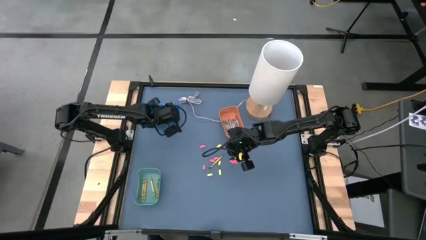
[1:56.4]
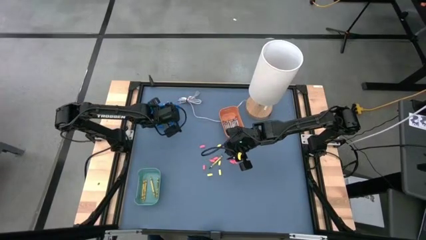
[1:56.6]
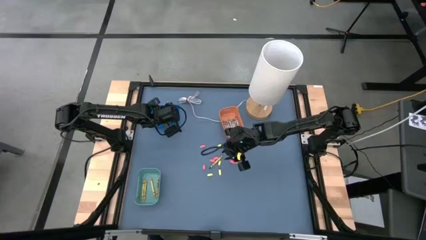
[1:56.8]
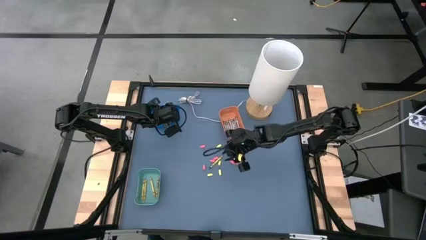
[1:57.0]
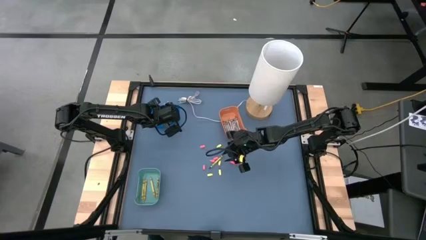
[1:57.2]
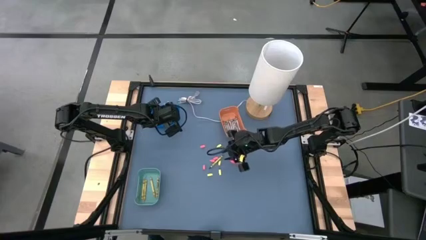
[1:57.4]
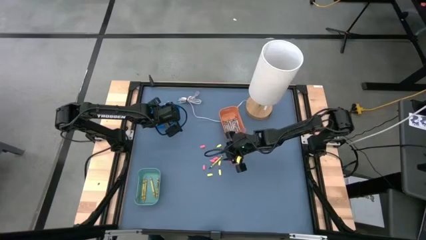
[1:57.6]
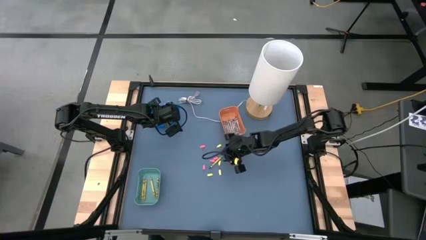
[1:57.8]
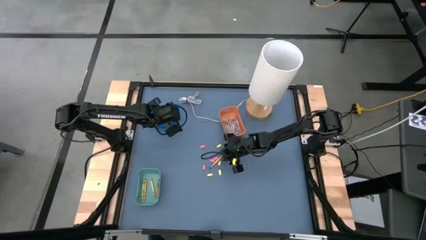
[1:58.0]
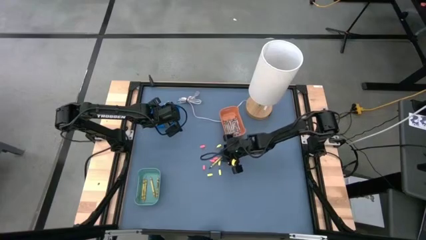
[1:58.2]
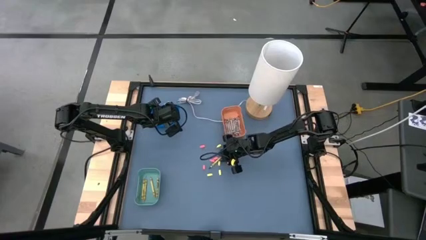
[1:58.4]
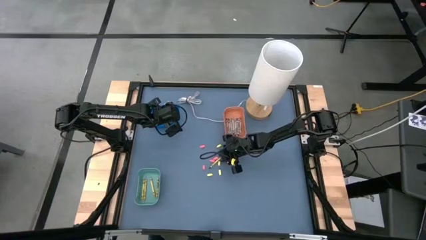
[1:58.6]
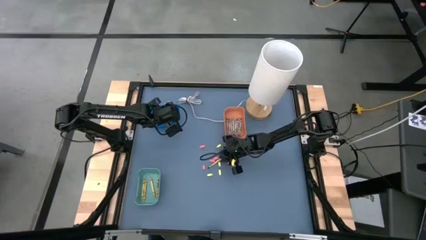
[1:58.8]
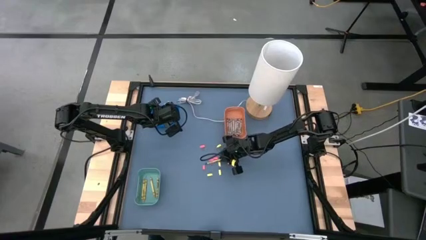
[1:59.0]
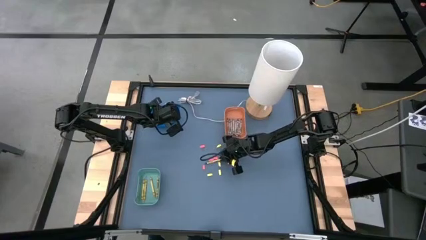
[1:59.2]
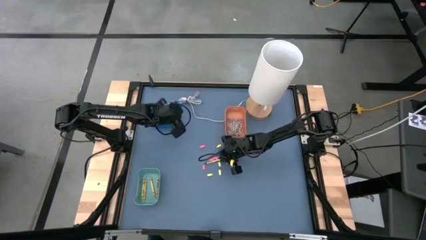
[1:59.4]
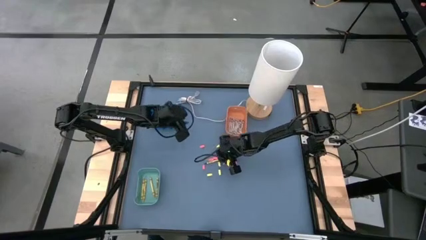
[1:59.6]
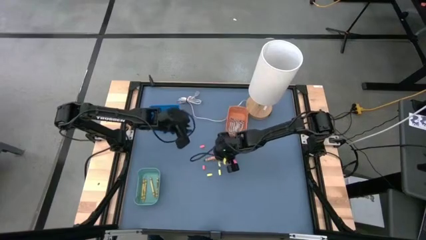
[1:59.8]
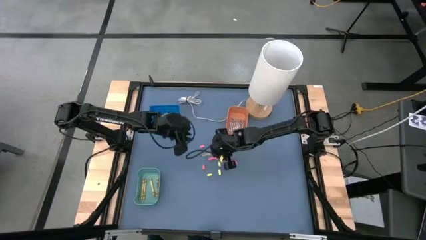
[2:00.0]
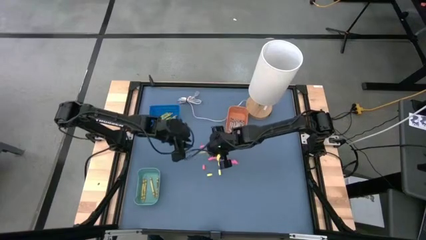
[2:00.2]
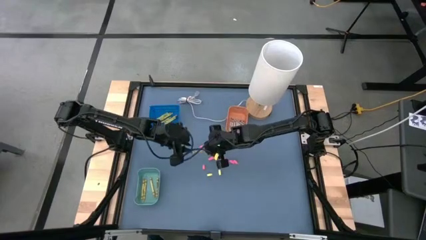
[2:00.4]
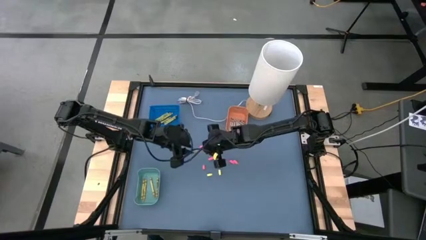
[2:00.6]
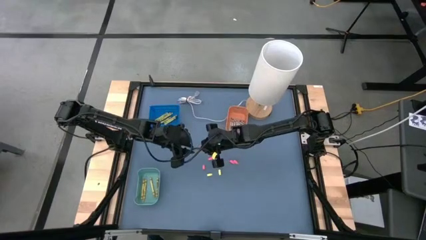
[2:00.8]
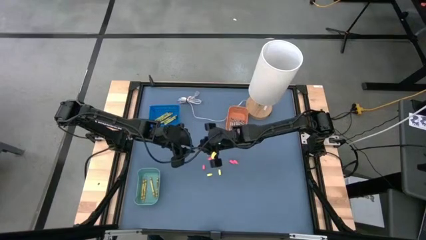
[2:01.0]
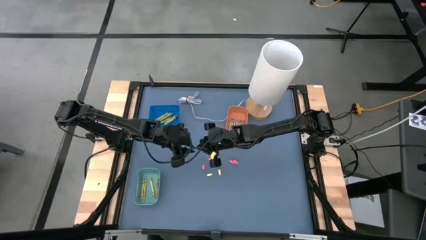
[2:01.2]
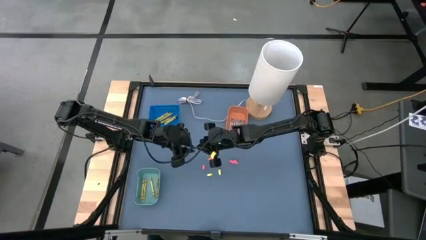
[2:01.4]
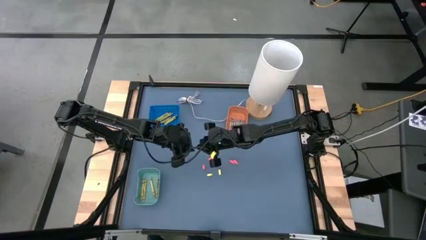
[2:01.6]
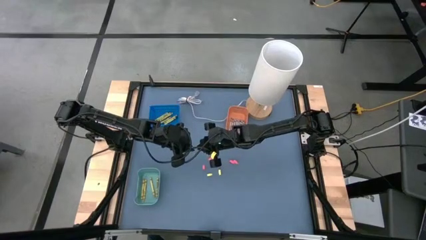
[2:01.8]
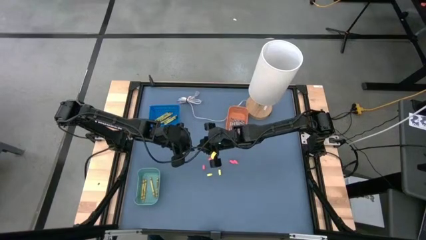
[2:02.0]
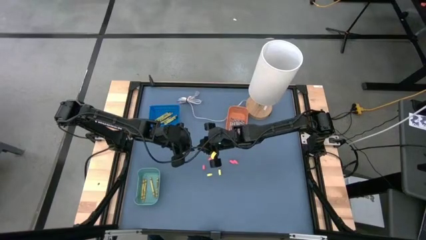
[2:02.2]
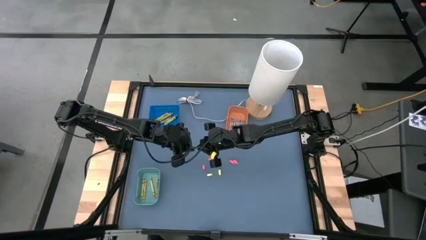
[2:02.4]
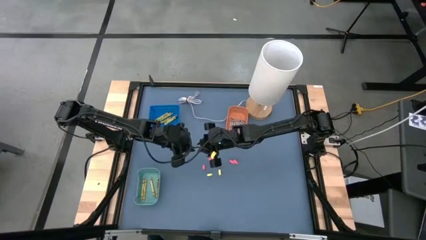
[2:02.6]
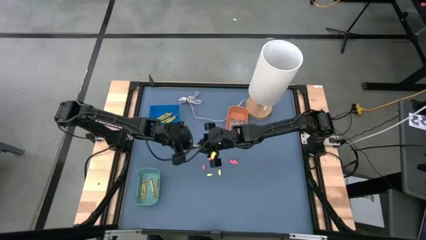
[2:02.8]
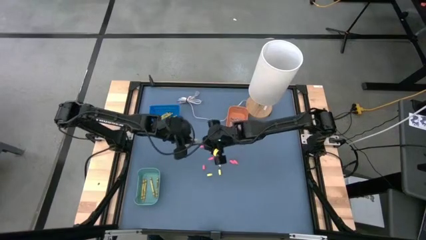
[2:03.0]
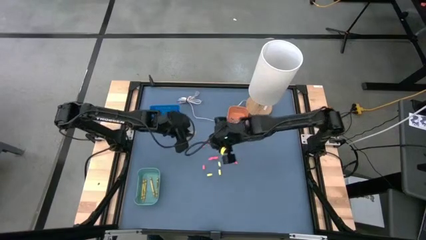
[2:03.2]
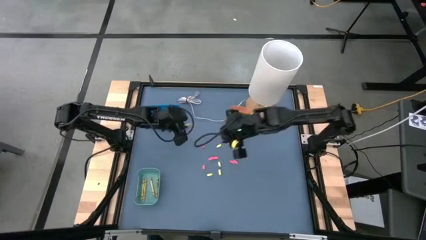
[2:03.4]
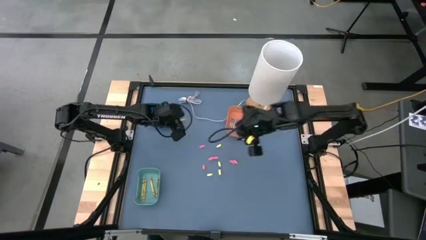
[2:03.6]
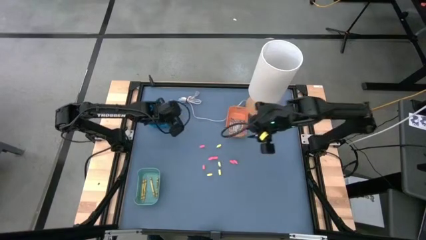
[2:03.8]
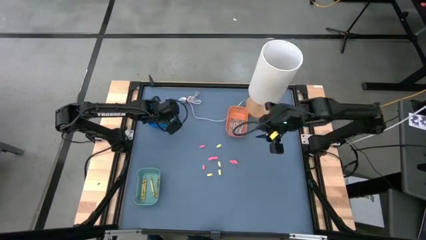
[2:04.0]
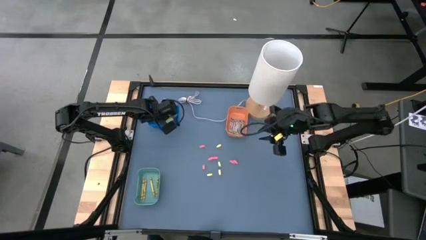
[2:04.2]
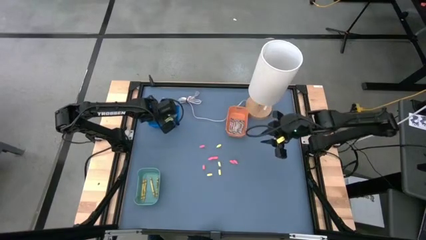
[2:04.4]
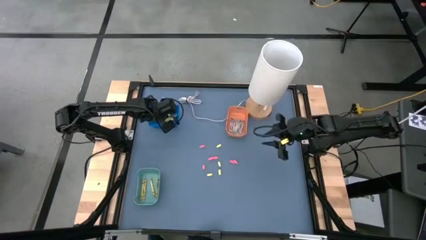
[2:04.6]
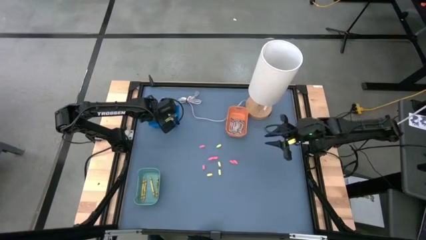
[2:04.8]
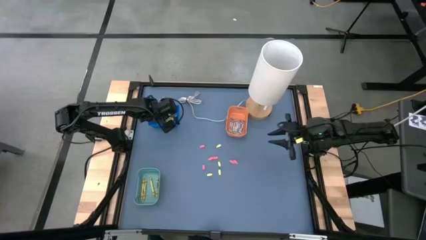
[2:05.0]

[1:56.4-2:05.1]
Task: Sort crayons
Put the green crayon into the blue bin

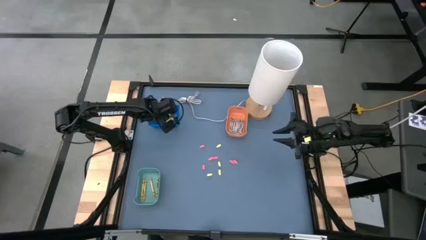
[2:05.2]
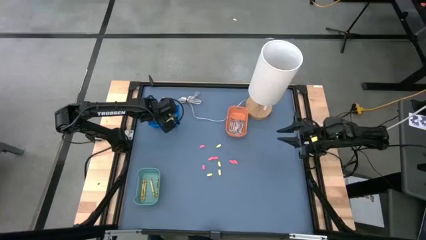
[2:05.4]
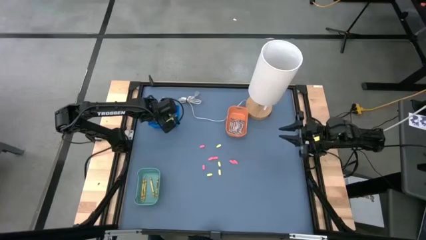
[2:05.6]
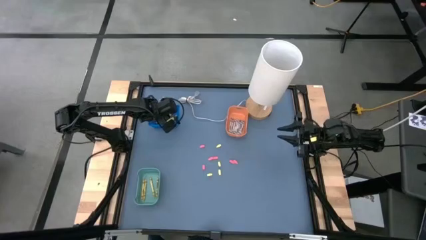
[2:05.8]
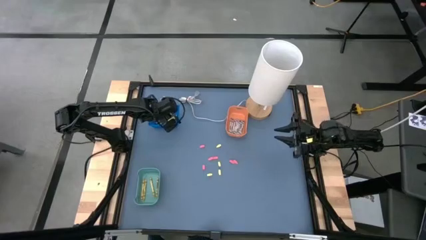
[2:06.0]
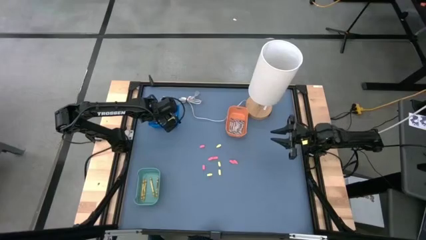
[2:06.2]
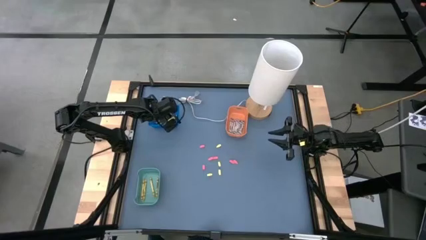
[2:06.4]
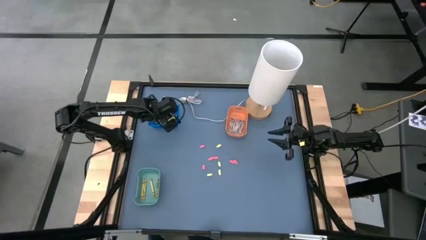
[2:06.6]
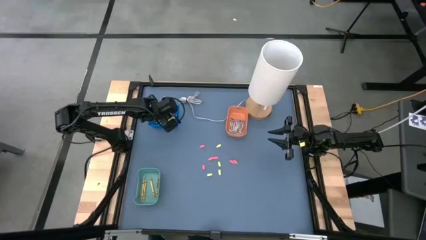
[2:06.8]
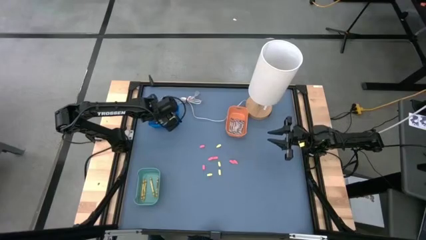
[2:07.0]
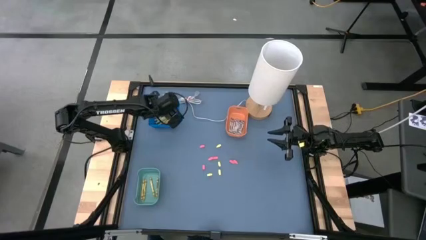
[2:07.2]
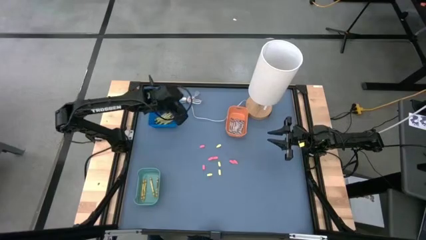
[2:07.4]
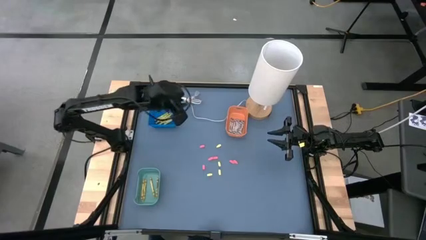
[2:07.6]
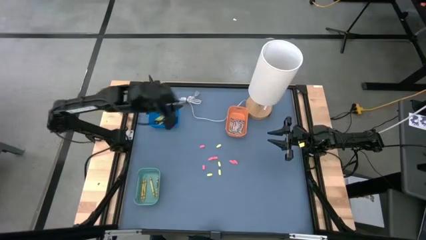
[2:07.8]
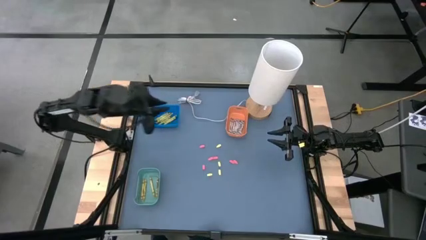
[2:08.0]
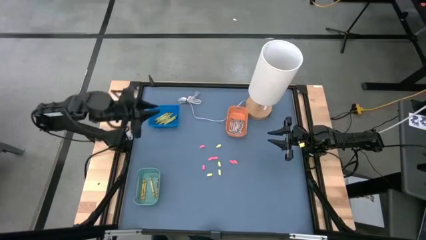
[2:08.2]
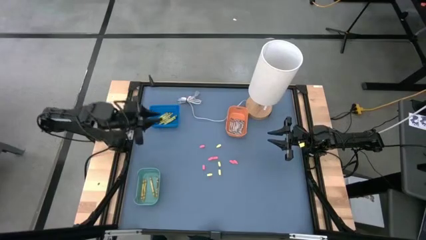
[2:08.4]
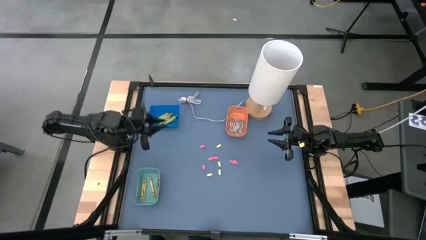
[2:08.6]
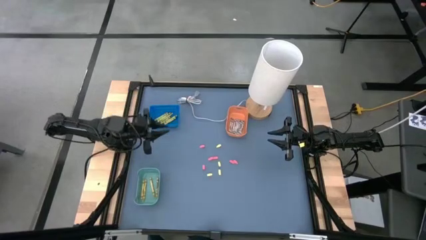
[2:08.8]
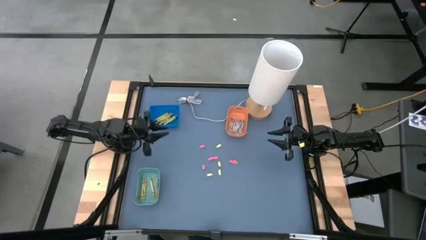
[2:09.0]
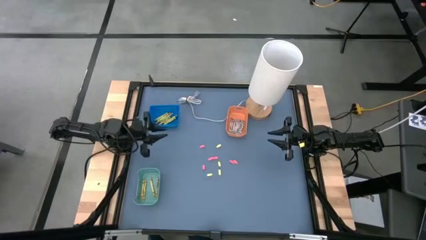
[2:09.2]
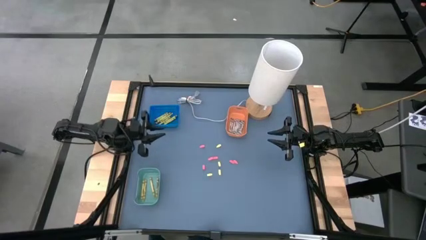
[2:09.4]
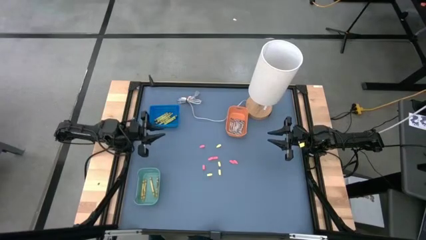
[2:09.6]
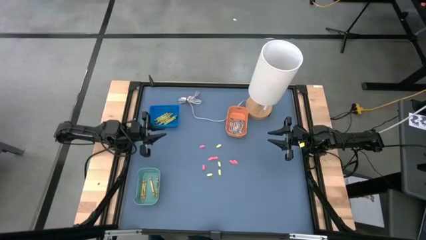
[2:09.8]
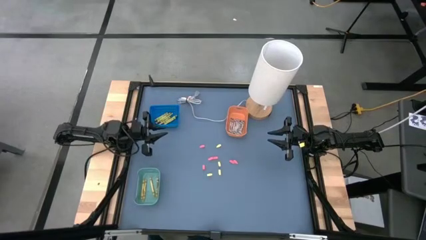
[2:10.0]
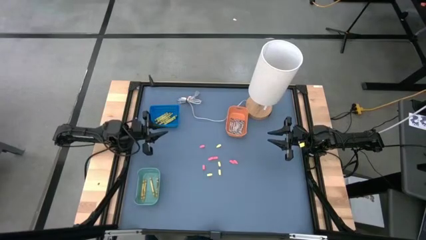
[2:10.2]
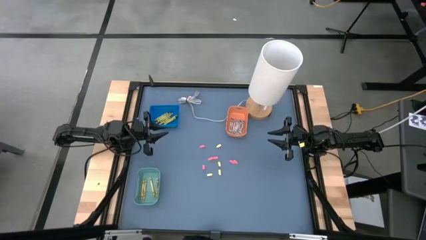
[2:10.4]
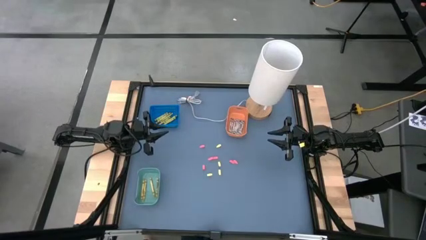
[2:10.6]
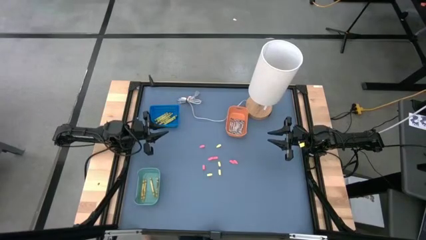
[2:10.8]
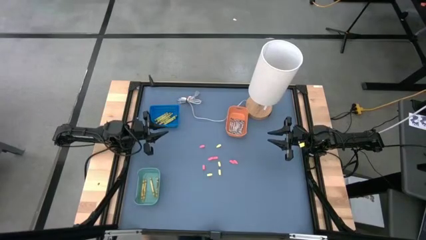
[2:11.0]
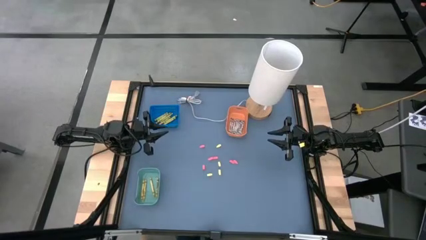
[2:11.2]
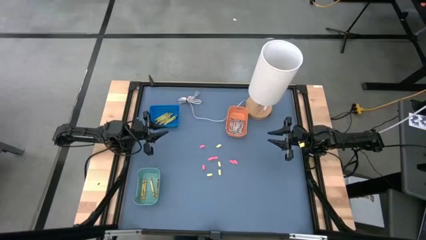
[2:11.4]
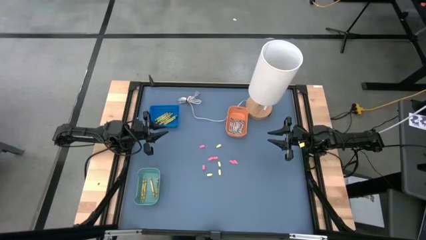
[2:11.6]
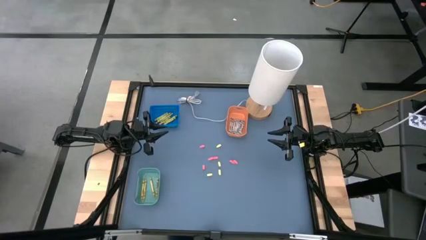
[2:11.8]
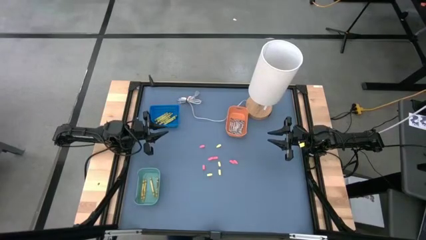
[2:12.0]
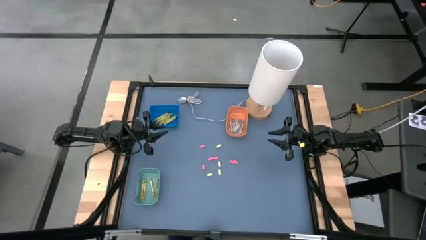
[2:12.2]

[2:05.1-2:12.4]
Return to Home Position
